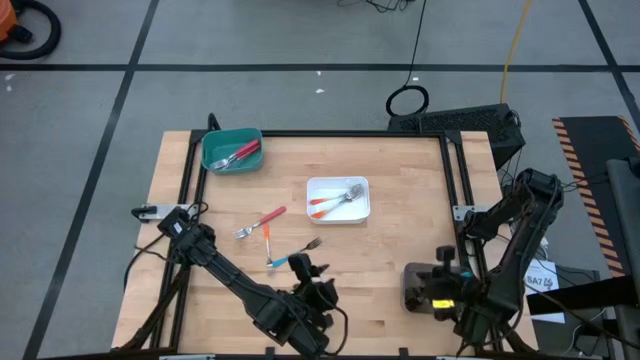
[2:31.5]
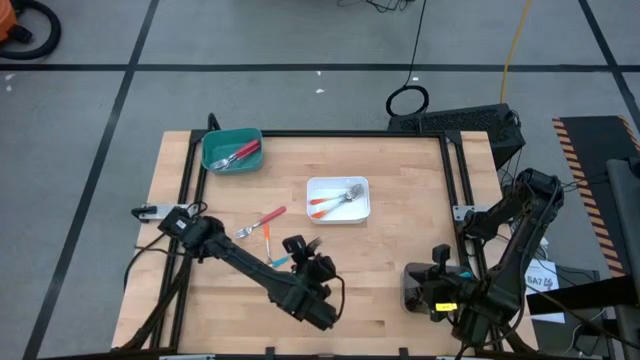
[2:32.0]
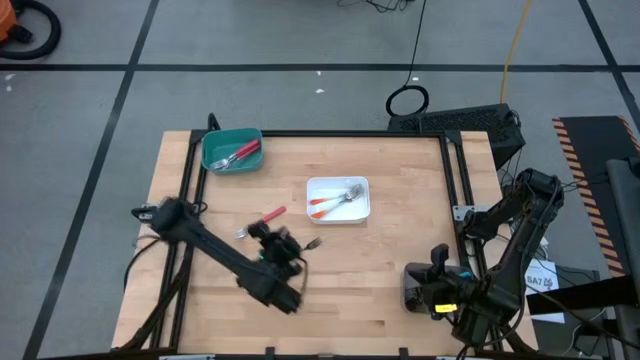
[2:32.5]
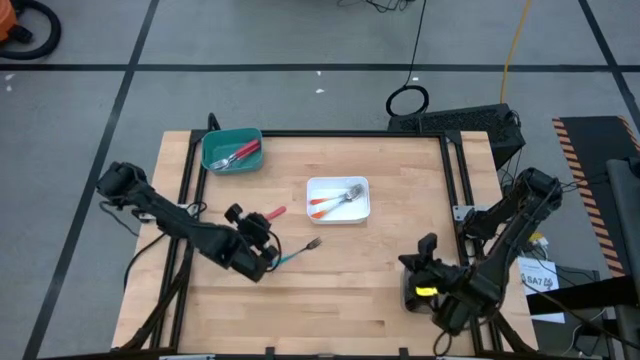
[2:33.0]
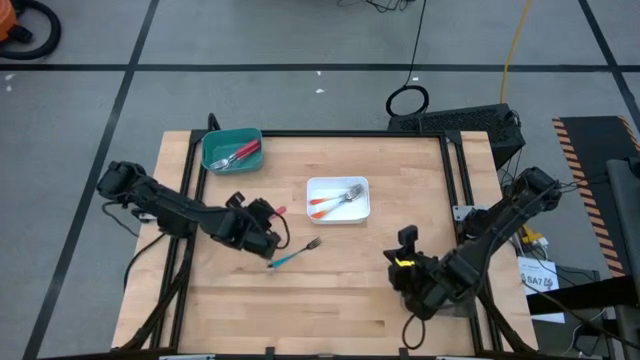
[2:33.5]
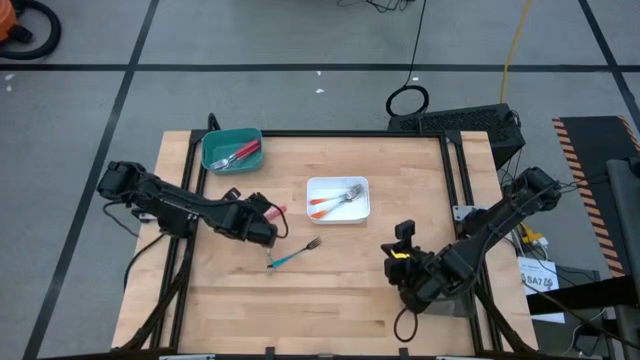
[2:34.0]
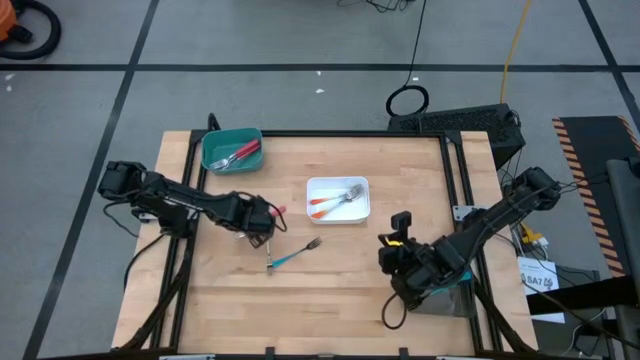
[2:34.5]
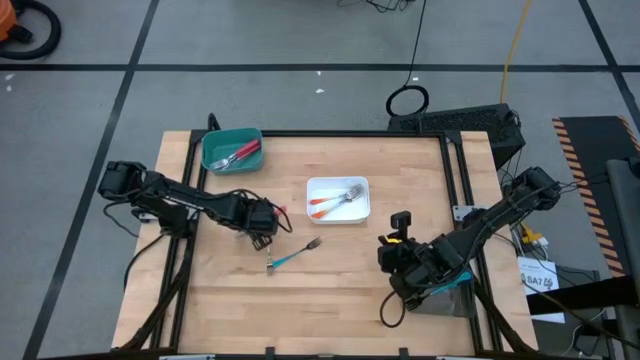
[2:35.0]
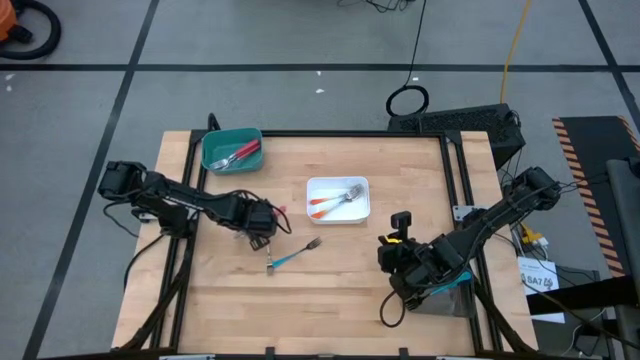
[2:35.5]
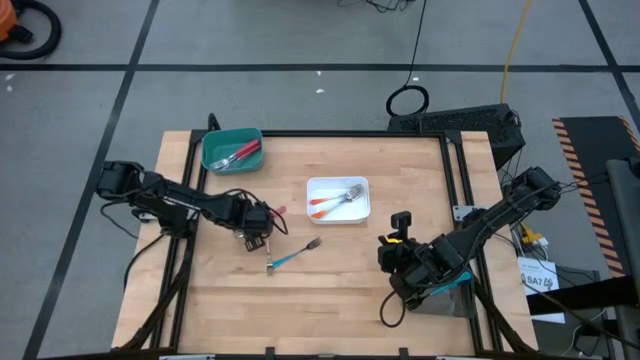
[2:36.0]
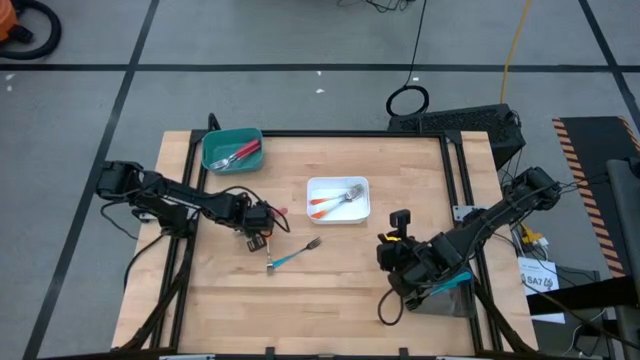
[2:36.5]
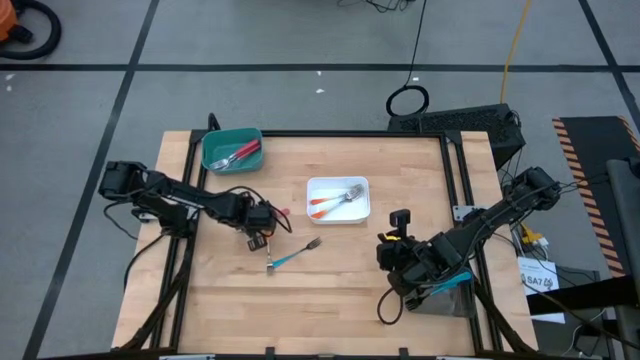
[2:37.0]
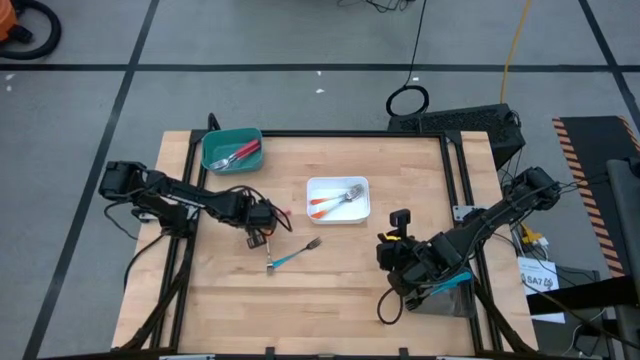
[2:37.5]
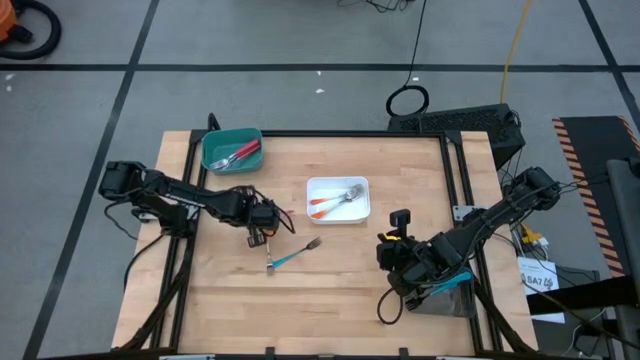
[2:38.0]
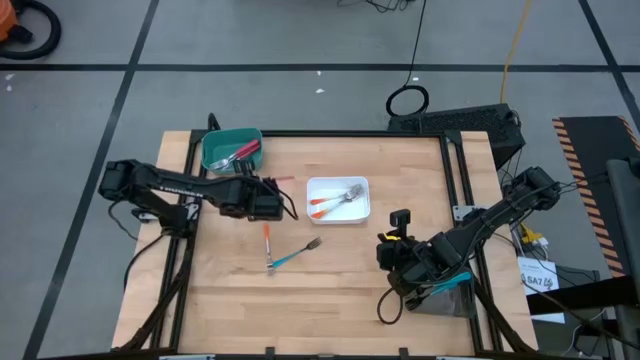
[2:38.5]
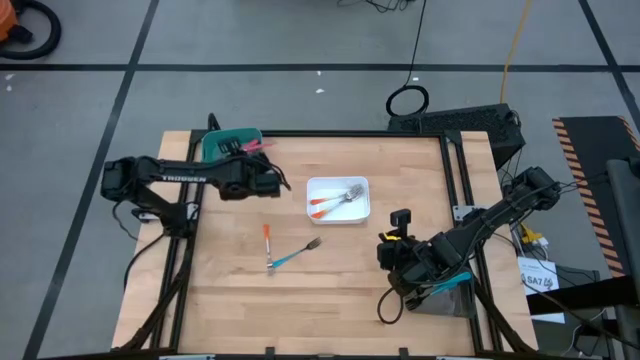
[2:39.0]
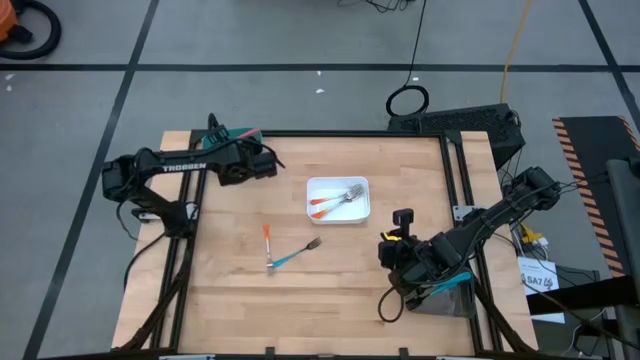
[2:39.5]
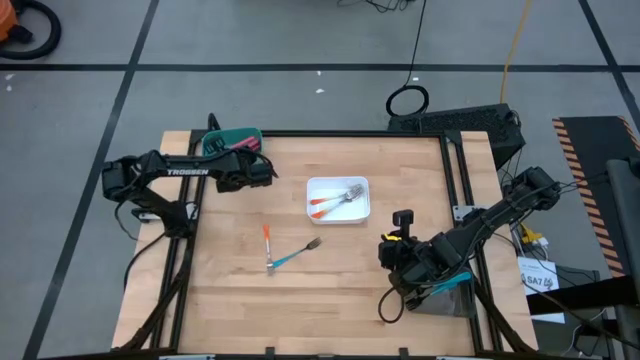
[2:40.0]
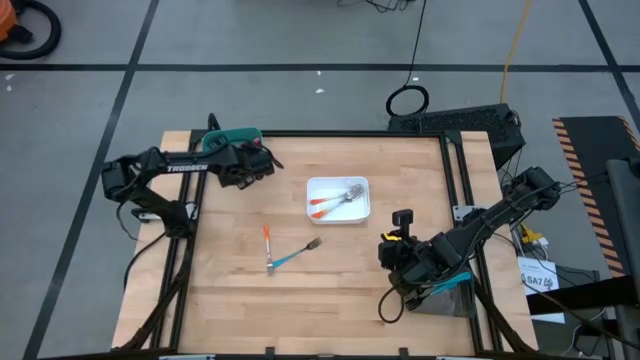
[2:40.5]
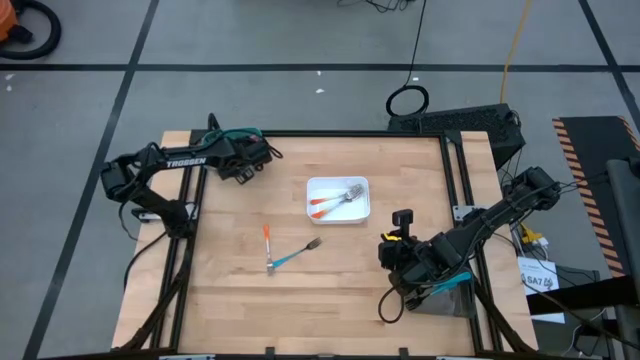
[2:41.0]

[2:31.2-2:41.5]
Task: Sort silverware by color (type)
Put the pink fork into the blue bin

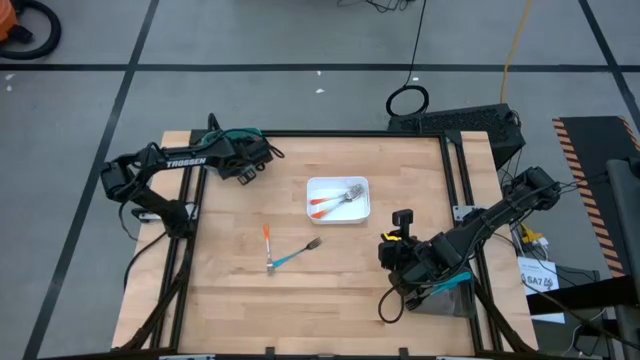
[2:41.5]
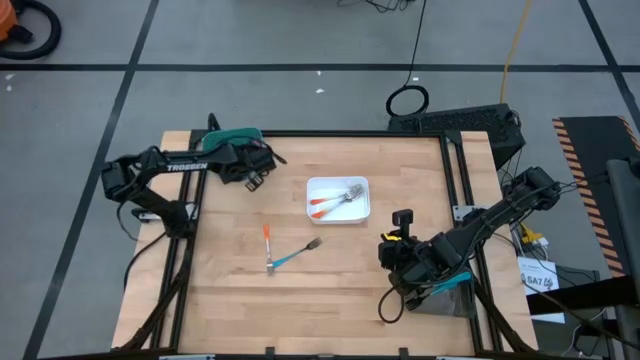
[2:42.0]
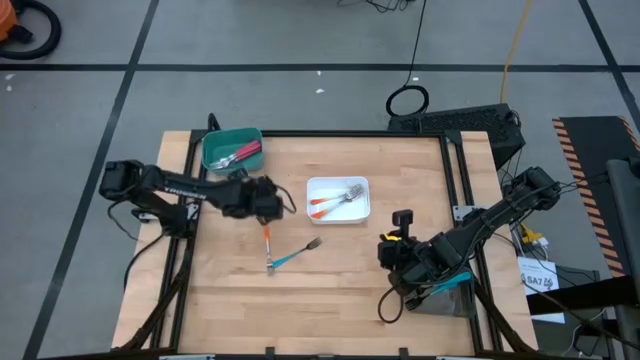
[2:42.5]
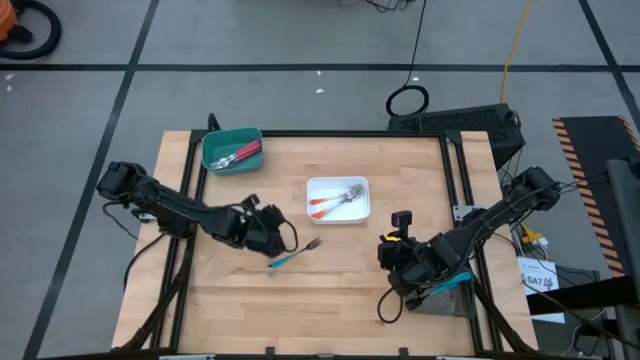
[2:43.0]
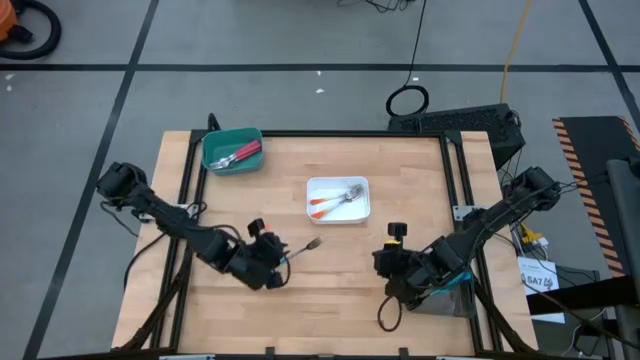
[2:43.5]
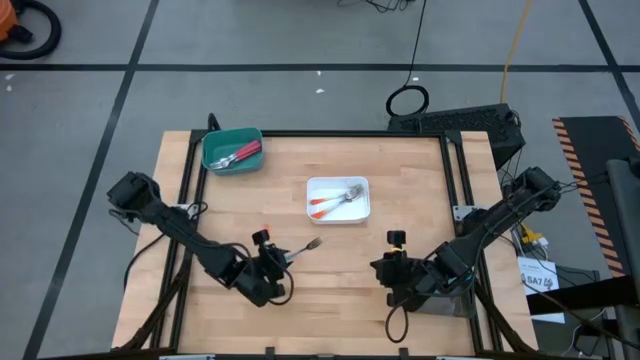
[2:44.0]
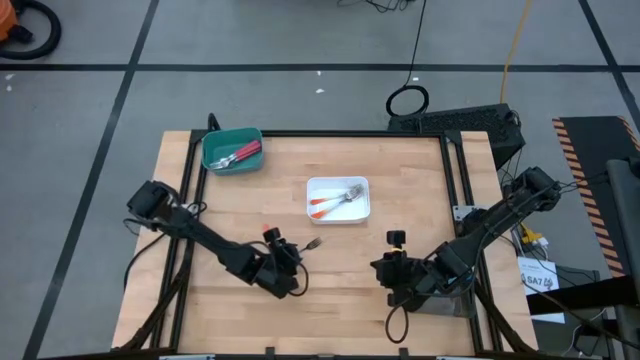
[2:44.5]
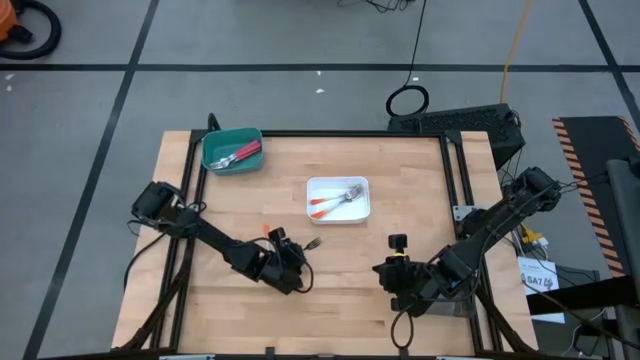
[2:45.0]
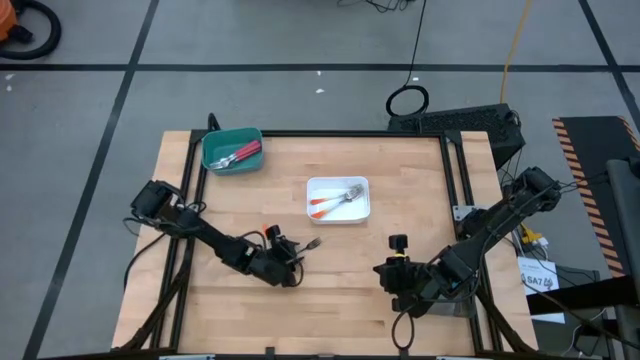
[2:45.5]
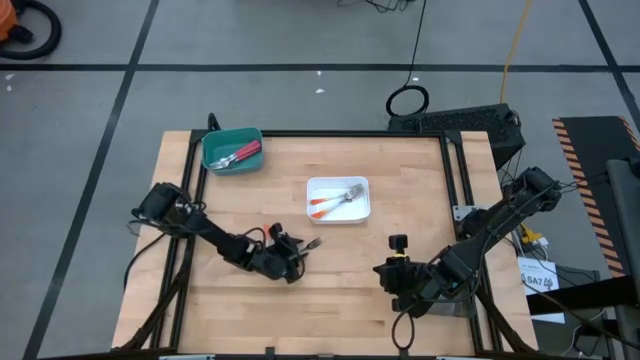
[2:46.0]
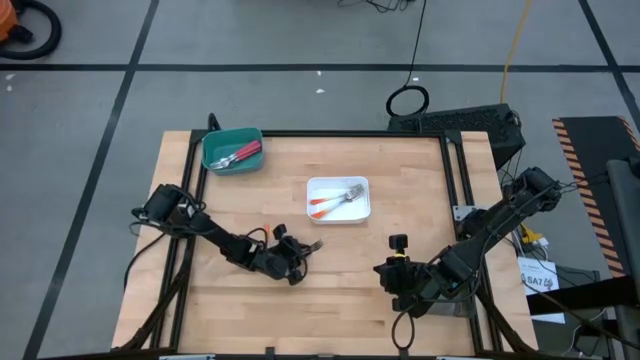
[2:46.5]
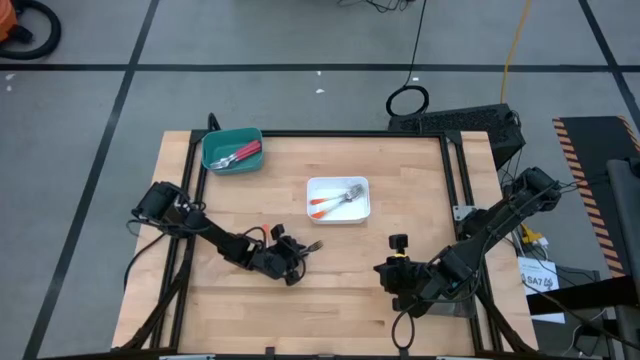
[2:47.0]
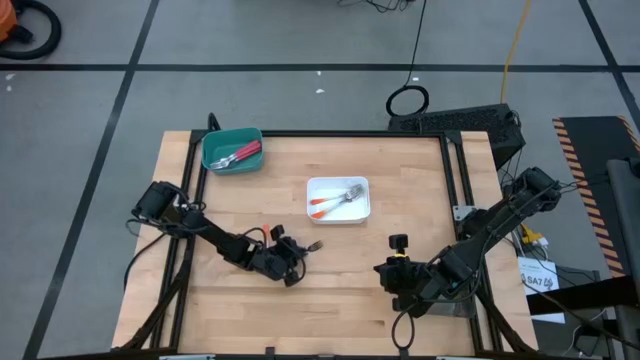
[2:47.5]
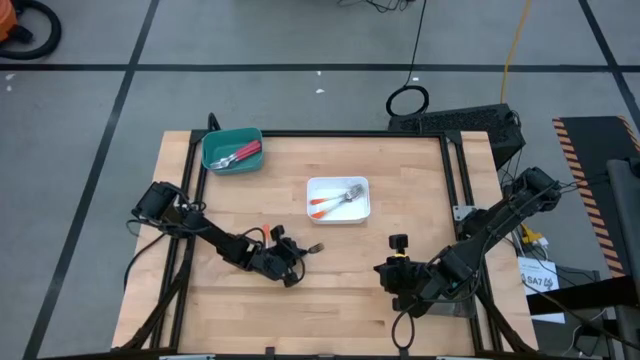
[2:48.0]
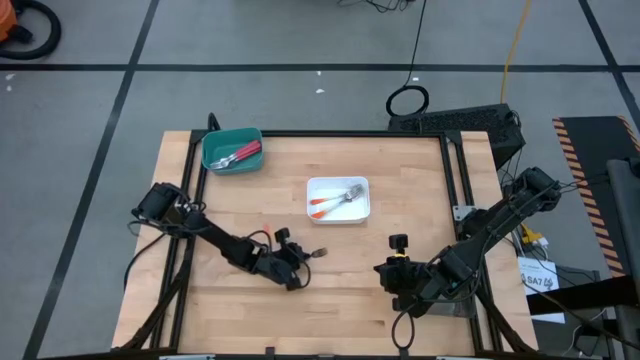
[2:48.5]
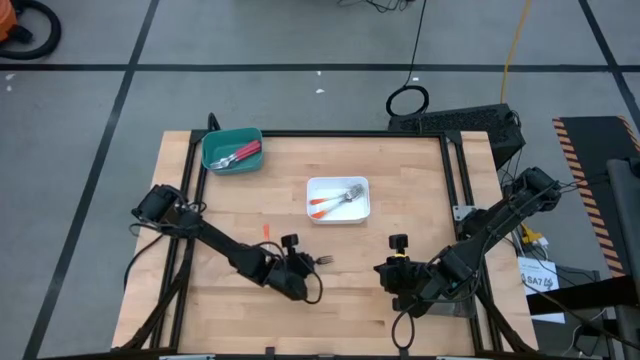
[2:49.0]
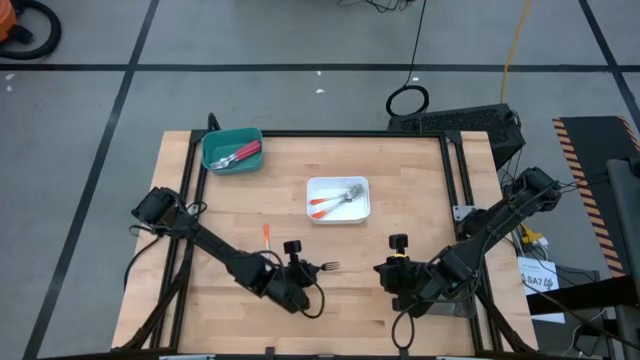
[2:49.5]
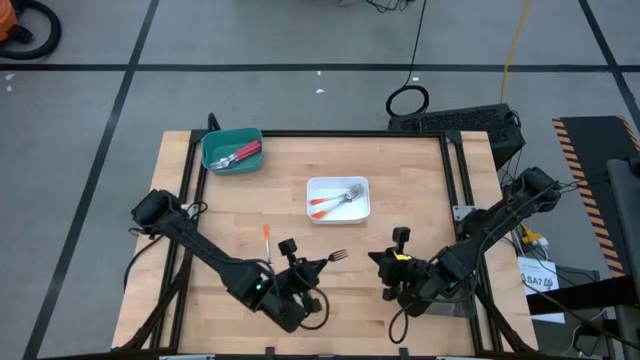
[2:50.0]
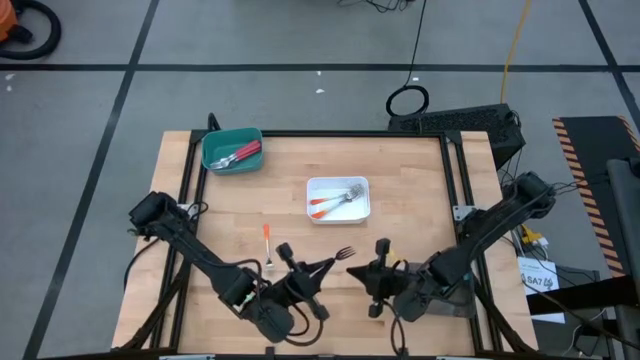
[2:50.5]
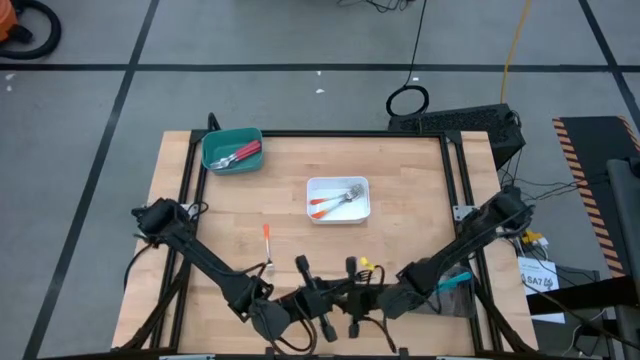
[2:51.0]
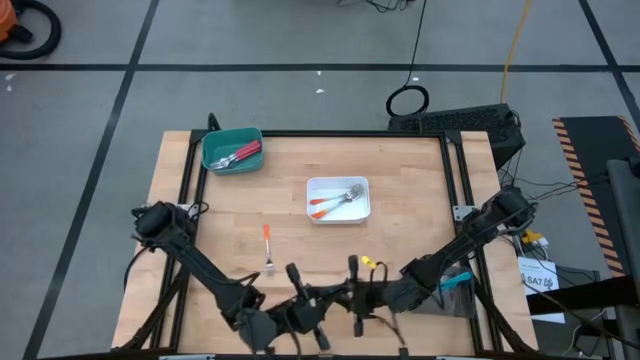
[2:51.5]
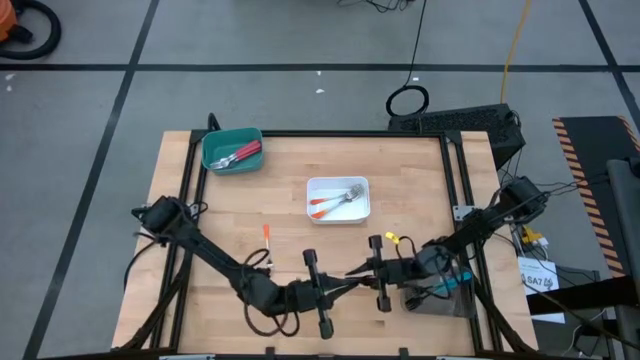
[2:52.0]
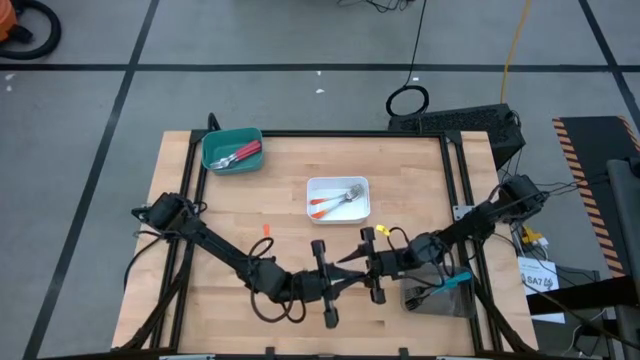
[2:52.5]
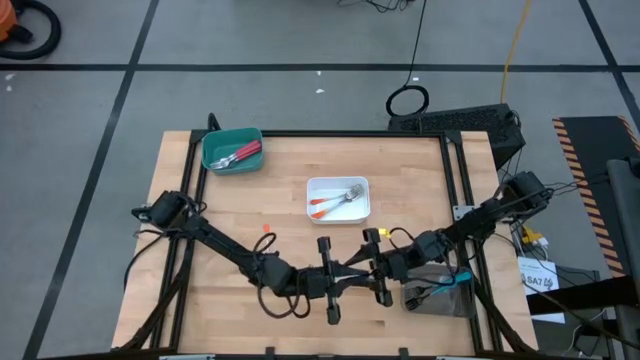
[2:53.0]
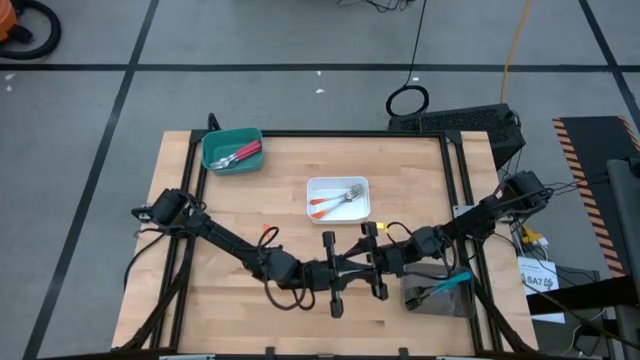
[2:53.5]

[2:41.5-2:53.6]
Put the blue fork into the black bin
